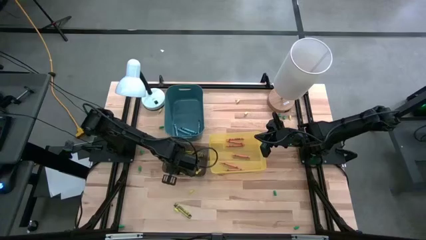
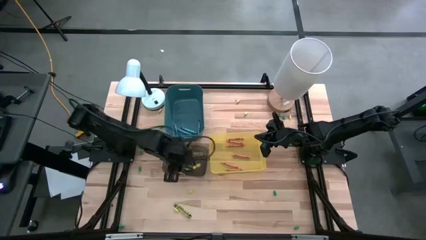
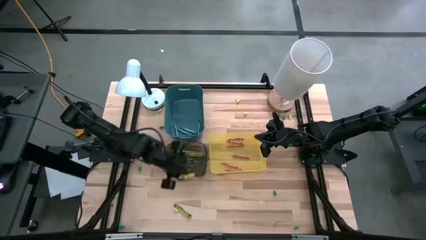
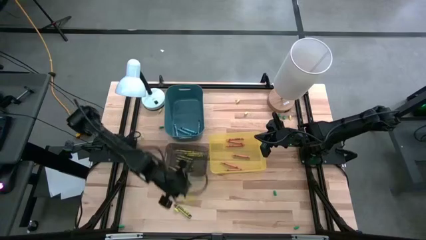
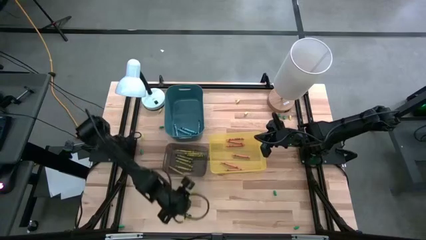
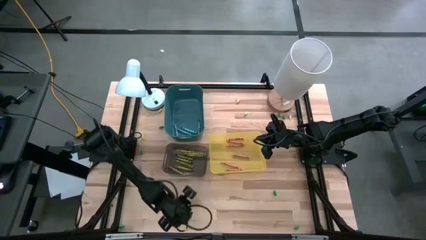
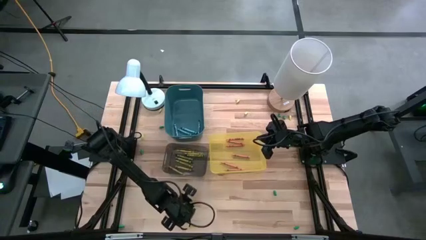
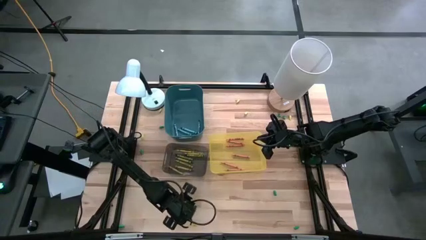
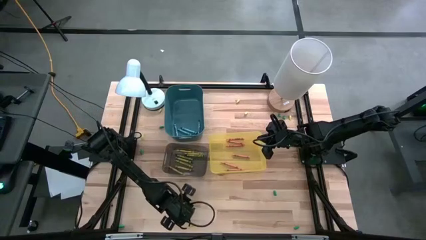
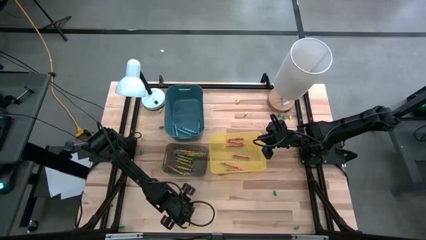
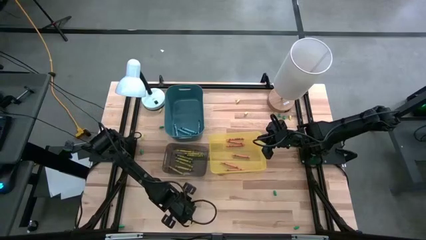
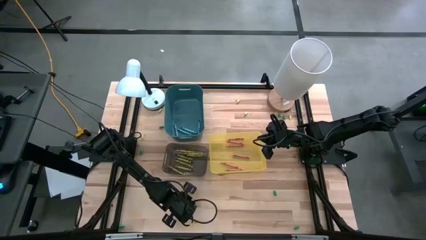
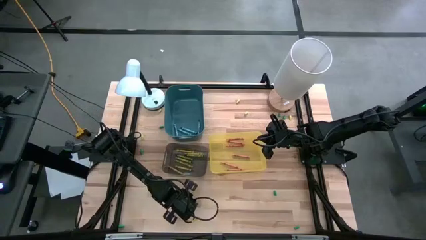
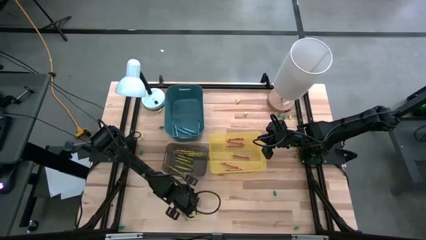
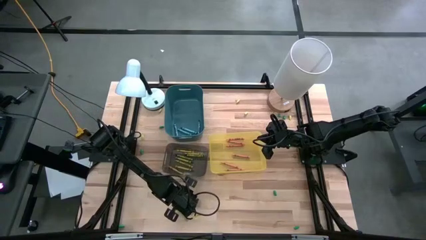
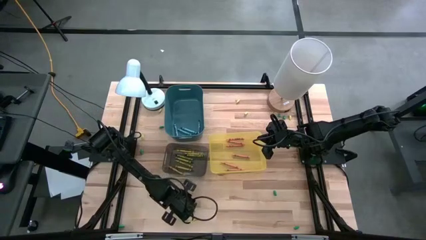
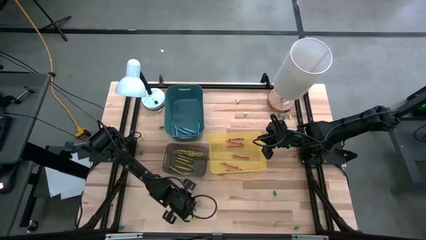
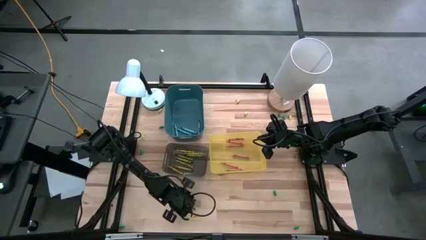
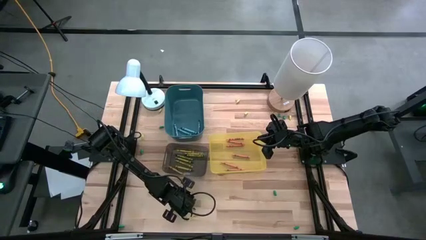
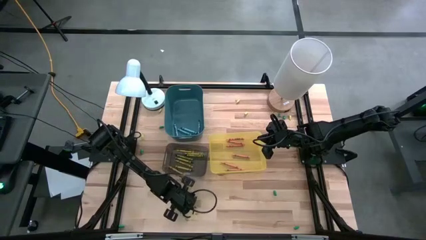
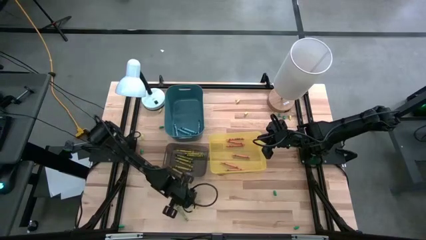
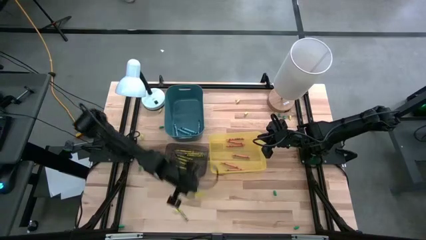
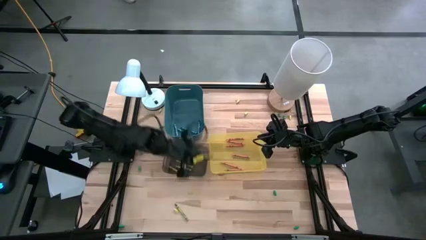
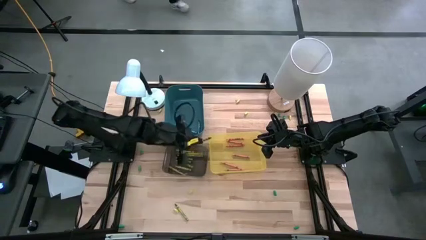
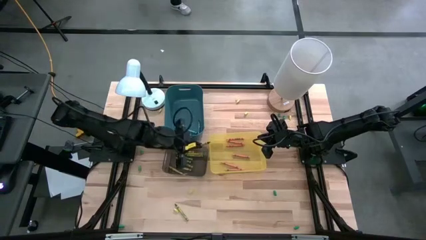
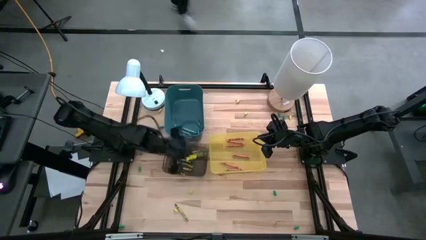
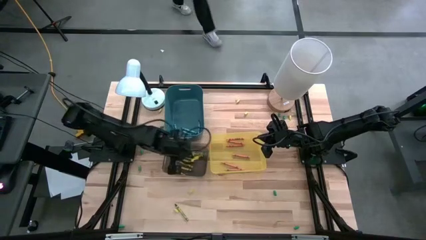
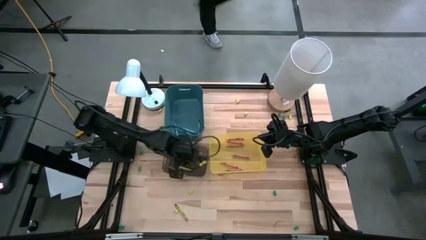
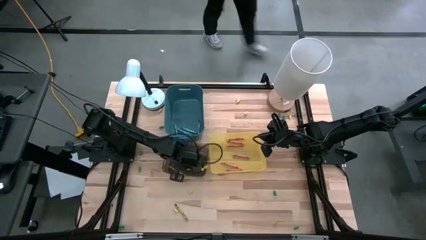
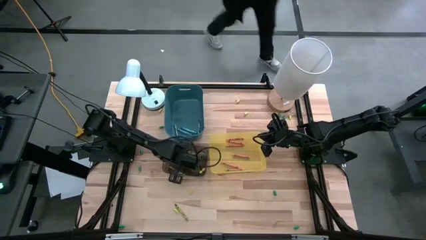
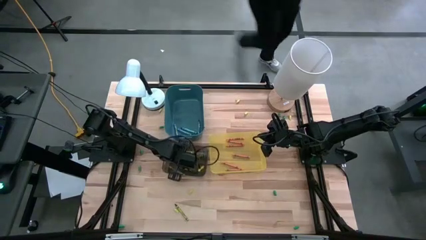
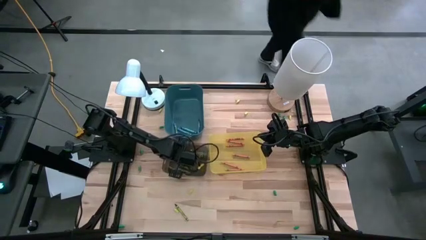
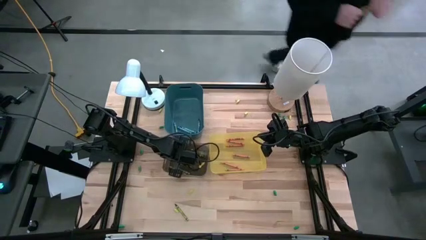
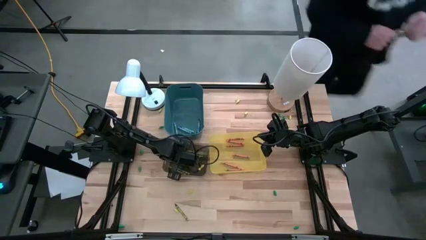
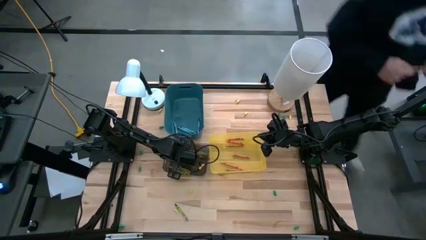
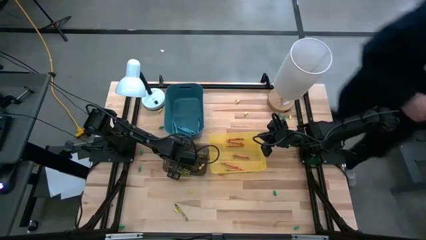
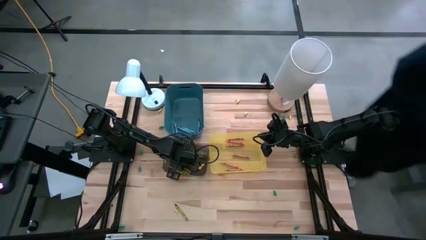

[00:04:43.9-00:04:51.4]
Task: Sort crayons
Put the green crayon into the black bin

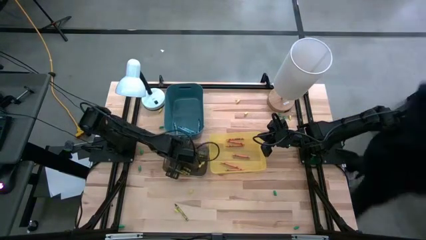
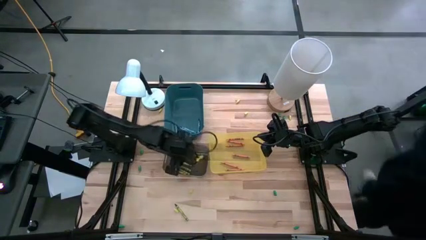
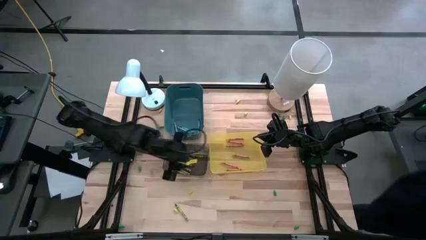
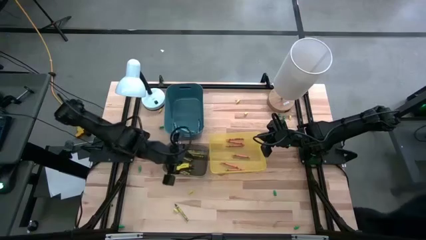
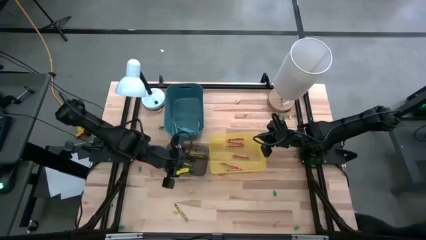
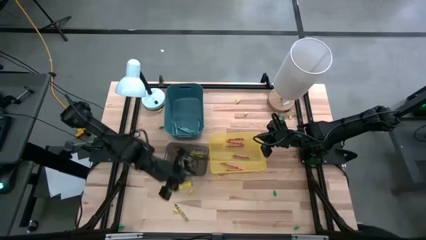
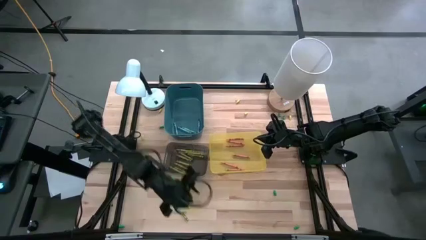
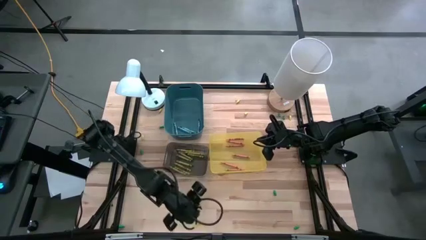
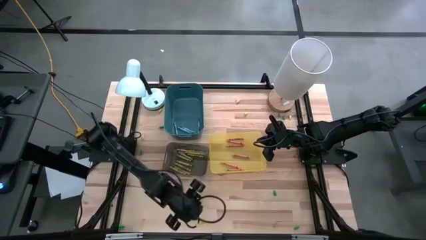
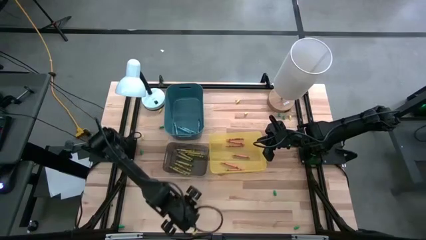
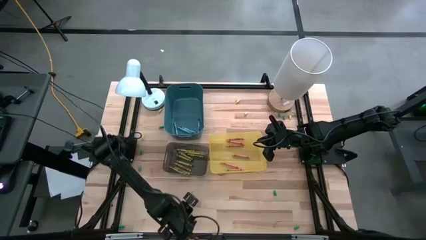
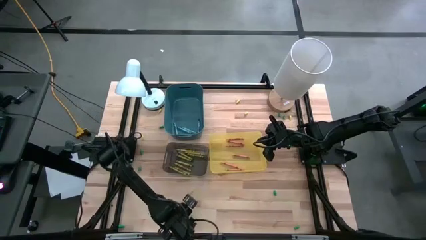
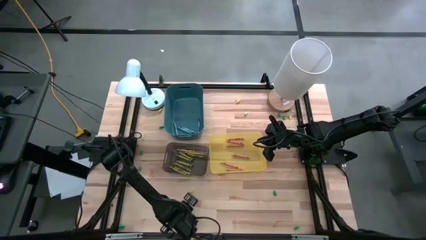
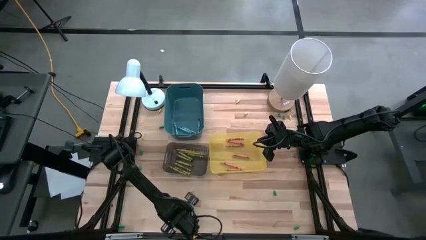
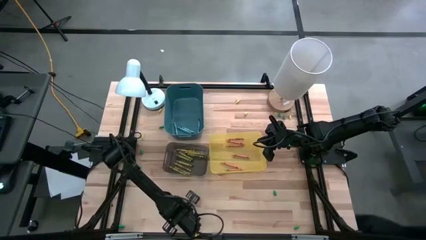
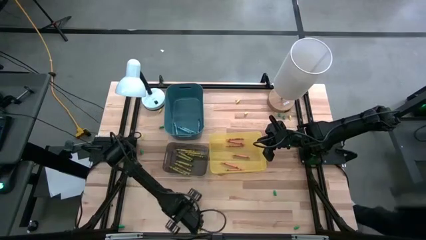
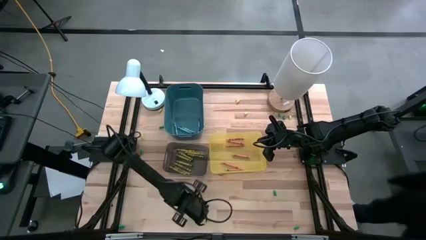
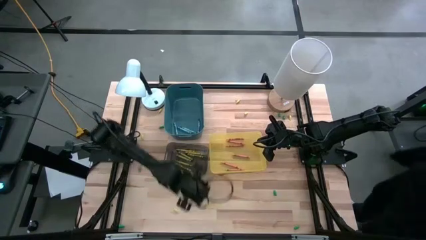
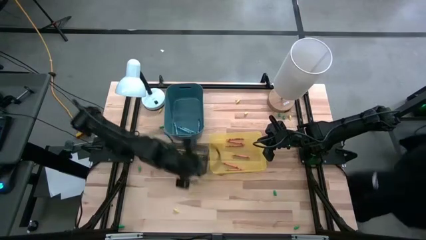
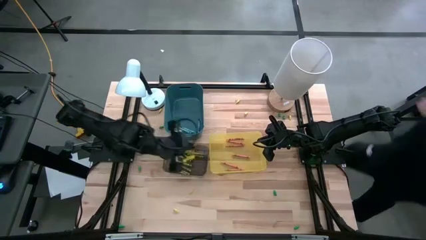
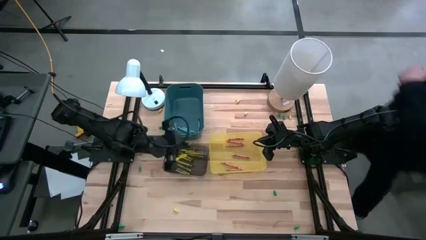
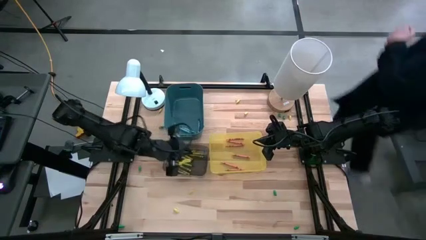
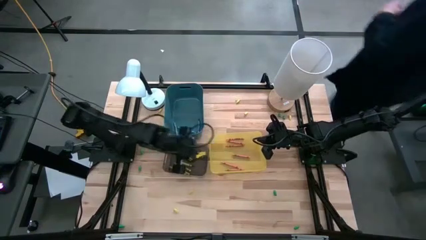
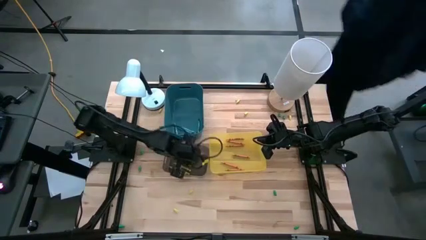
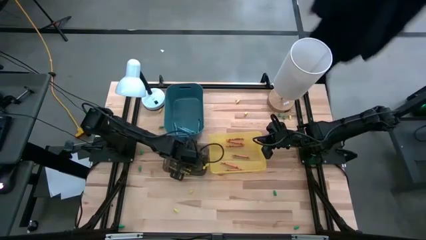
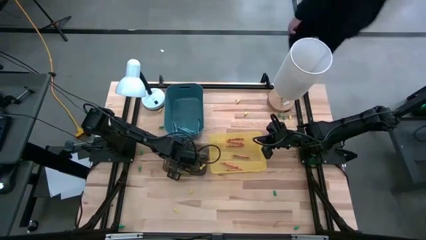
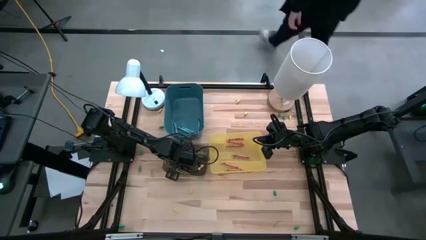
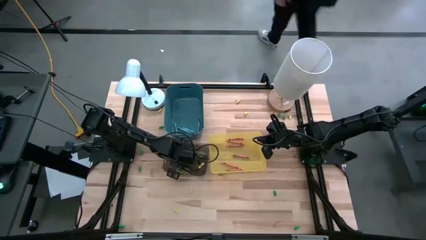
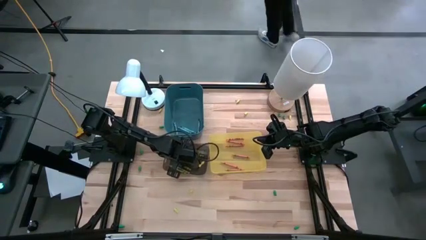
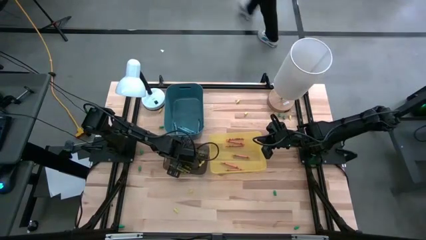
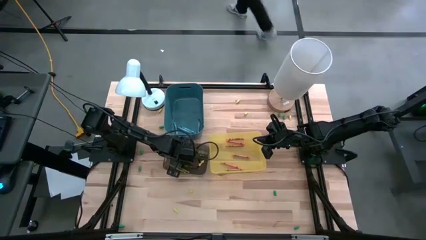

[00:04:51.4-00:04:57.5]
Put the green crayon into the black bin

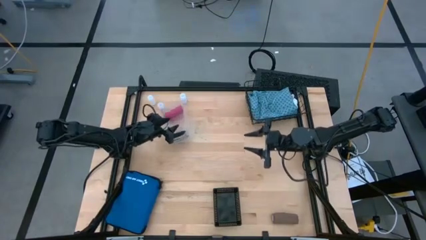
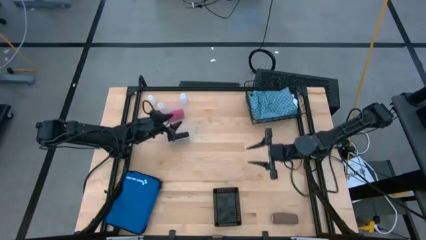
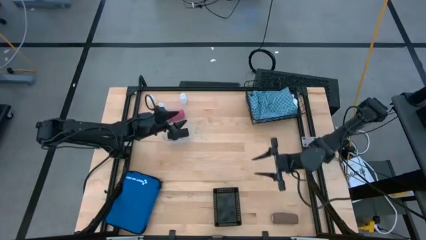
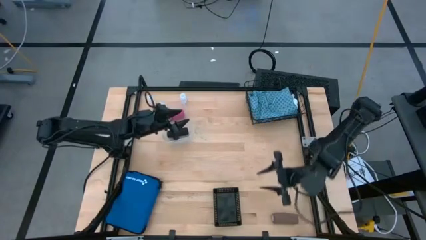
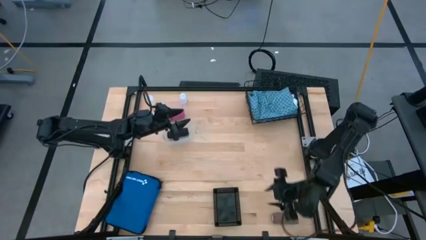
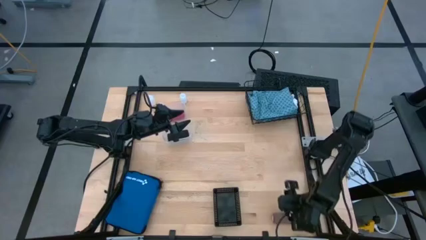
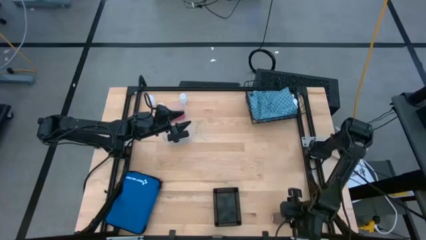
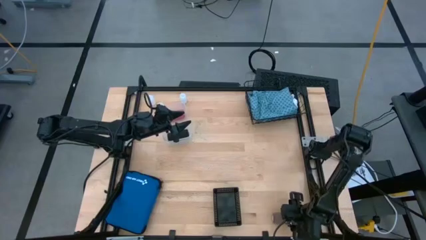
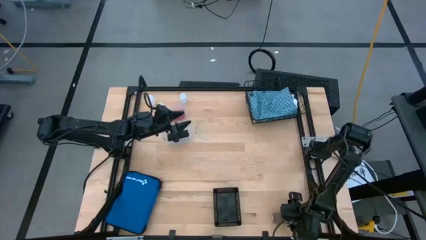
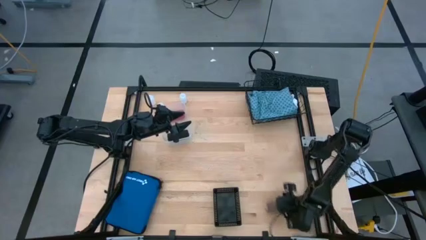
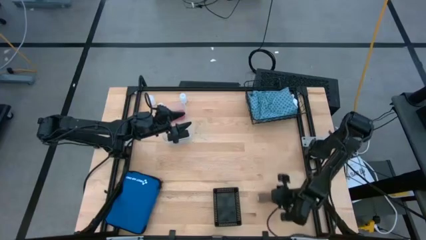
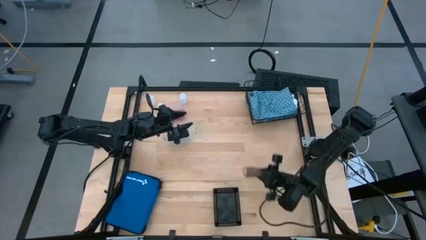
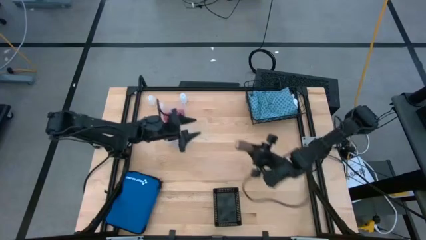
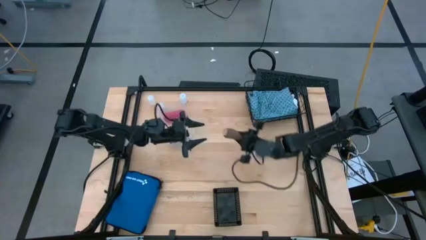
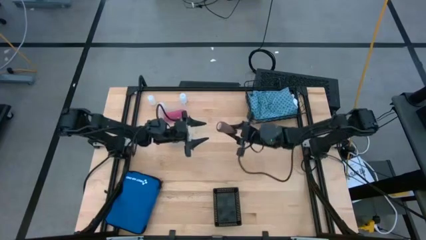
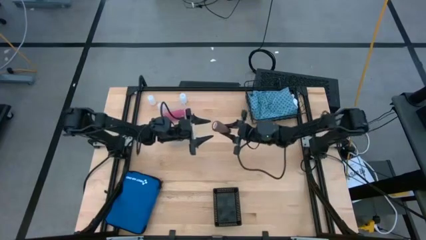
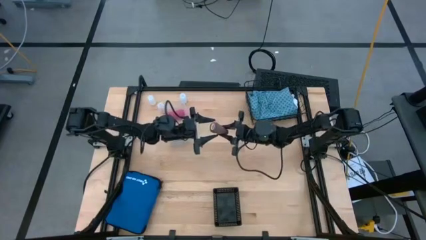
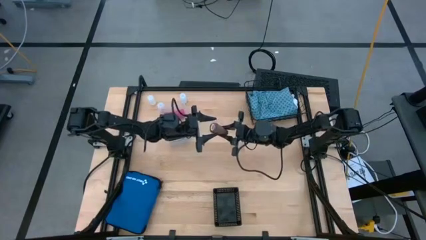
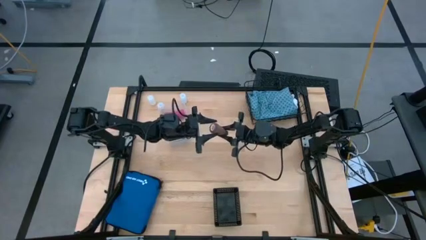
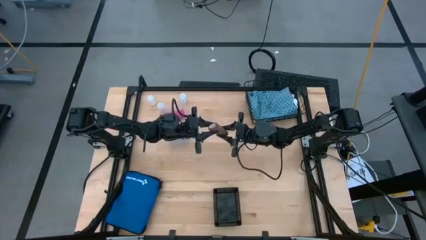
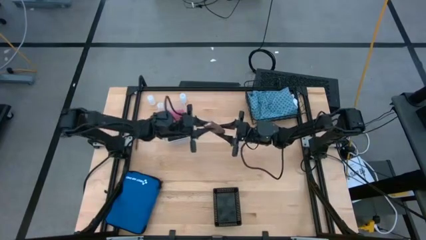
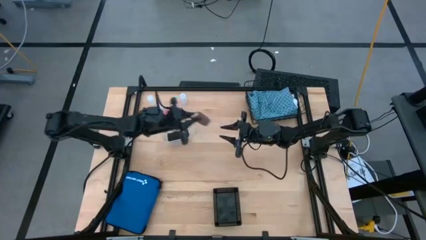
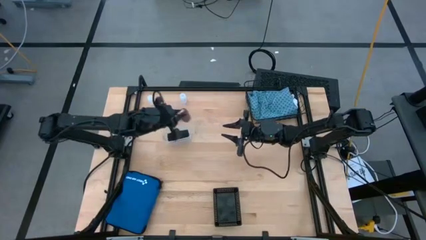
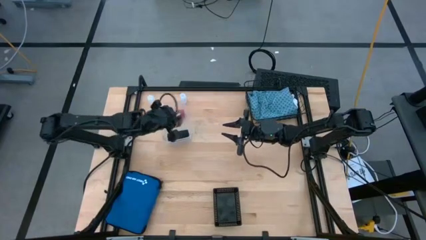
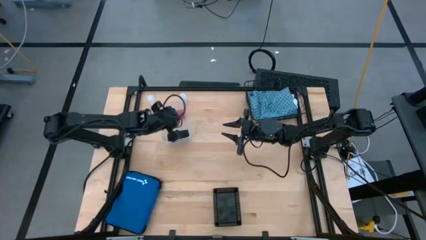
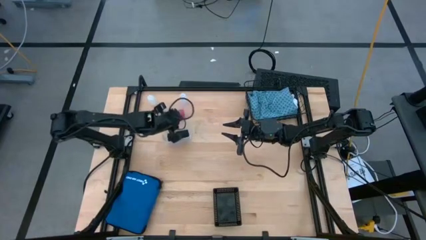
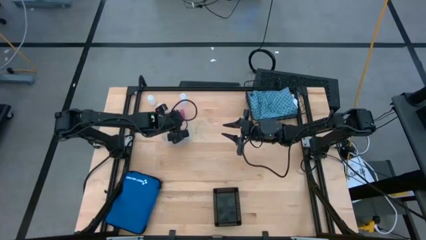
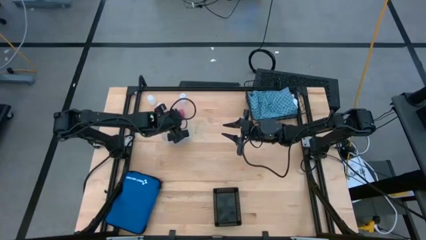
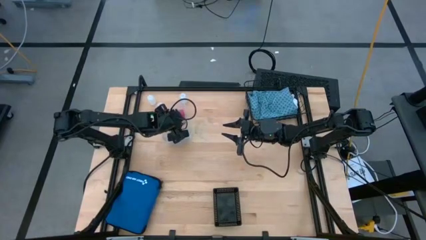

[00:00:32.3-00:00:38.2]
Task: Pick & Place Medicine items
Put the brown bandage into the transparent bin
